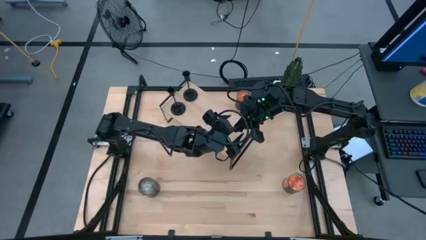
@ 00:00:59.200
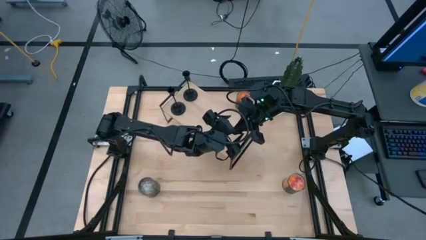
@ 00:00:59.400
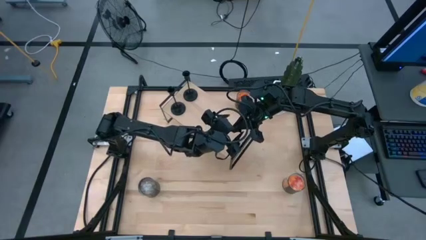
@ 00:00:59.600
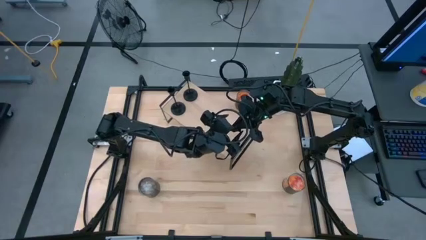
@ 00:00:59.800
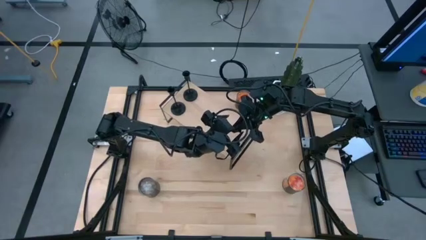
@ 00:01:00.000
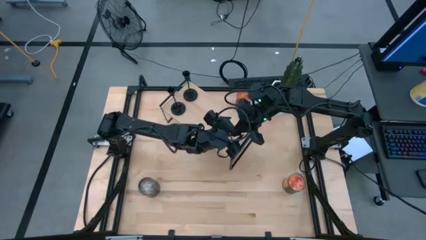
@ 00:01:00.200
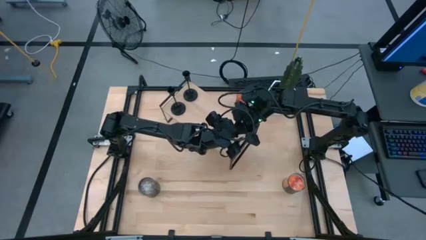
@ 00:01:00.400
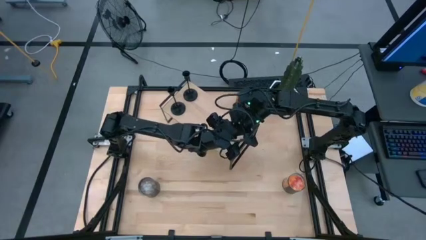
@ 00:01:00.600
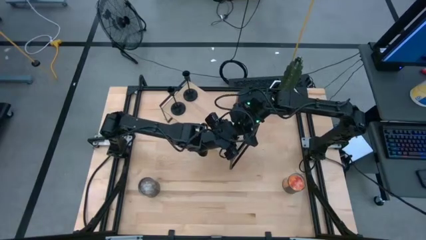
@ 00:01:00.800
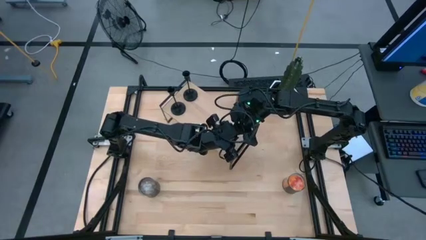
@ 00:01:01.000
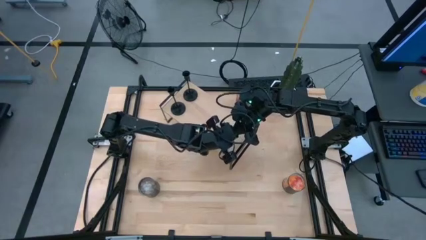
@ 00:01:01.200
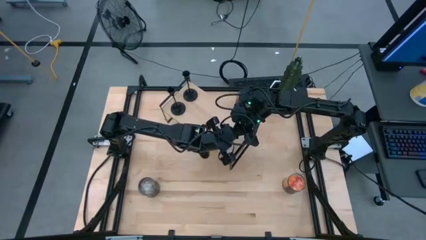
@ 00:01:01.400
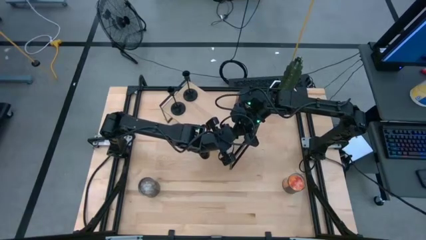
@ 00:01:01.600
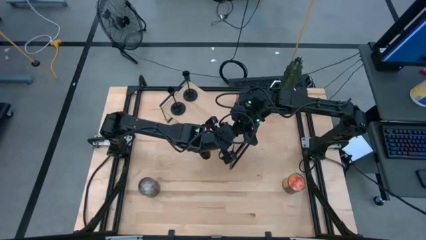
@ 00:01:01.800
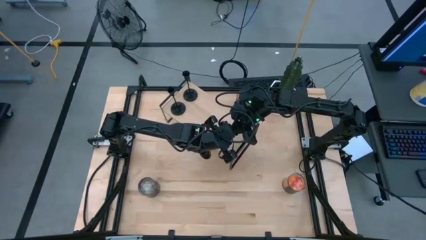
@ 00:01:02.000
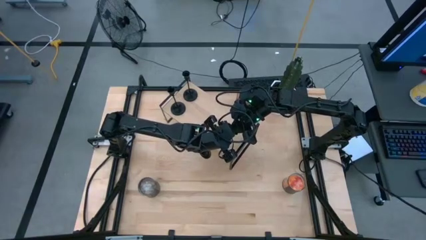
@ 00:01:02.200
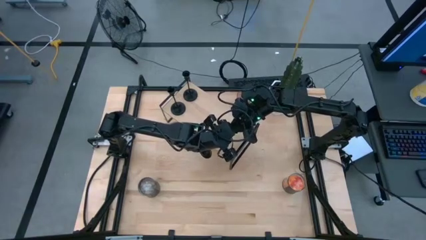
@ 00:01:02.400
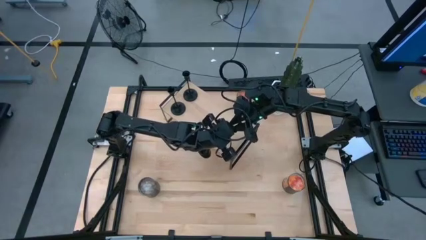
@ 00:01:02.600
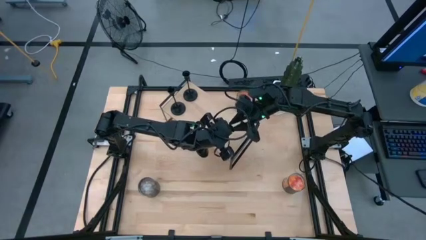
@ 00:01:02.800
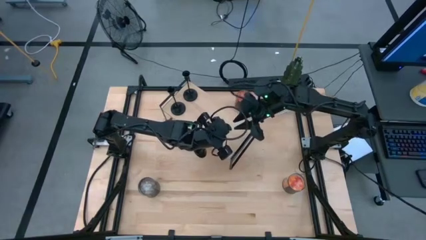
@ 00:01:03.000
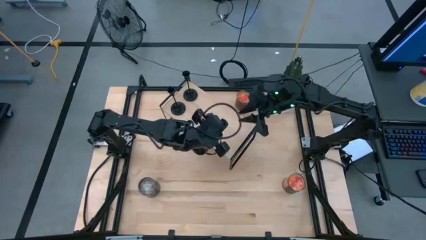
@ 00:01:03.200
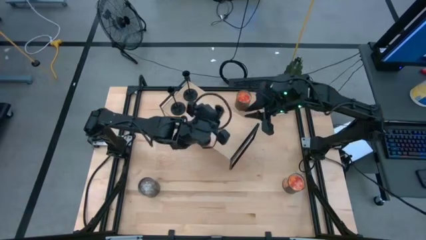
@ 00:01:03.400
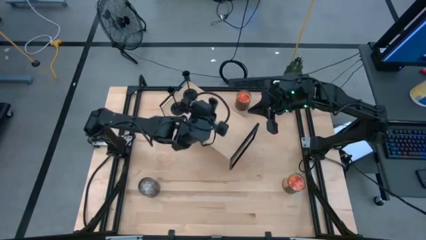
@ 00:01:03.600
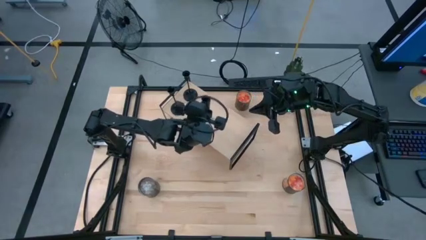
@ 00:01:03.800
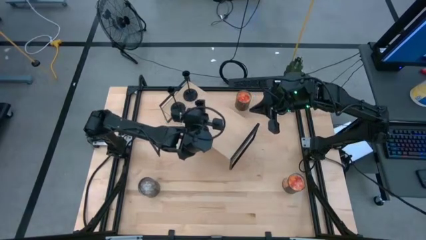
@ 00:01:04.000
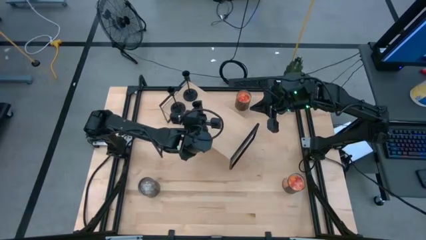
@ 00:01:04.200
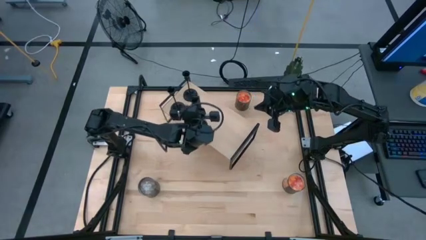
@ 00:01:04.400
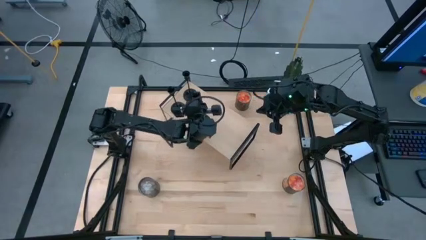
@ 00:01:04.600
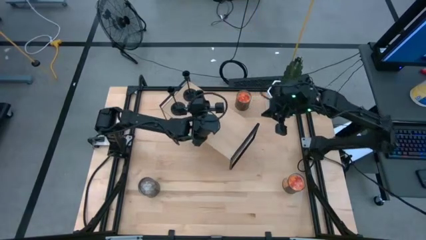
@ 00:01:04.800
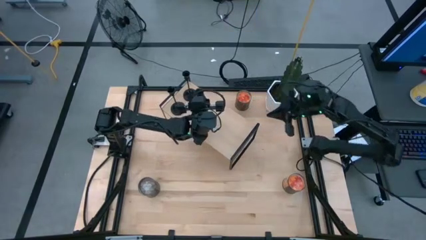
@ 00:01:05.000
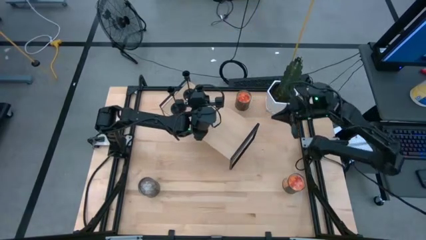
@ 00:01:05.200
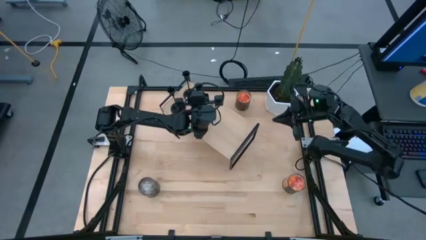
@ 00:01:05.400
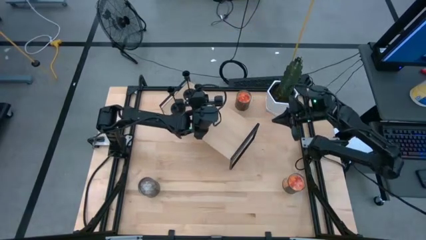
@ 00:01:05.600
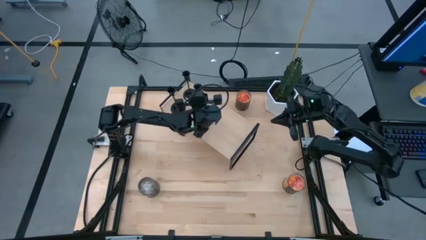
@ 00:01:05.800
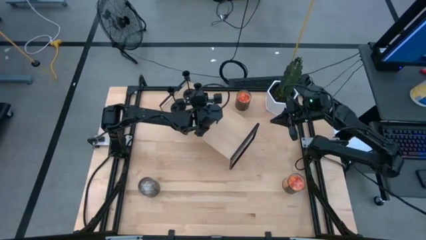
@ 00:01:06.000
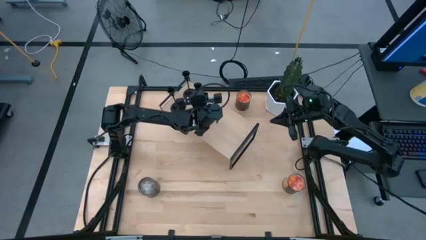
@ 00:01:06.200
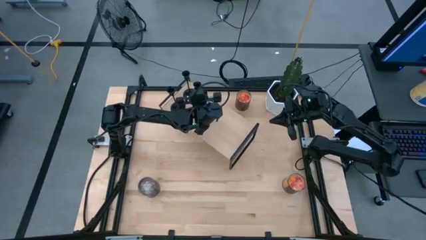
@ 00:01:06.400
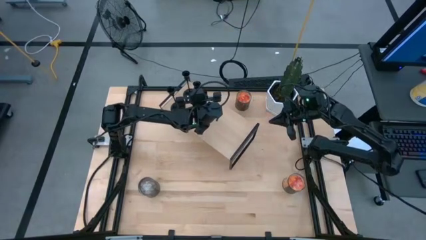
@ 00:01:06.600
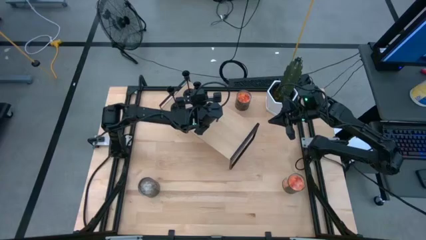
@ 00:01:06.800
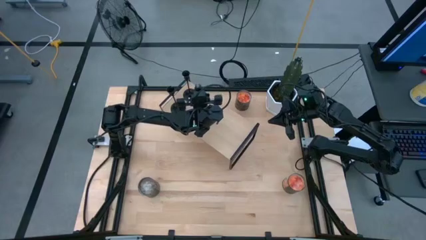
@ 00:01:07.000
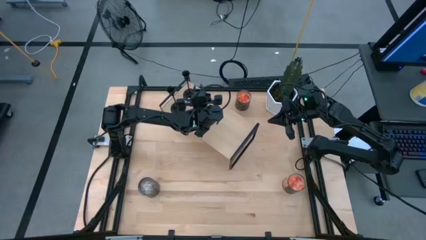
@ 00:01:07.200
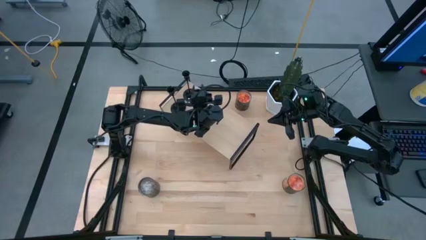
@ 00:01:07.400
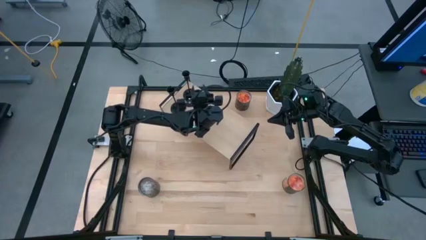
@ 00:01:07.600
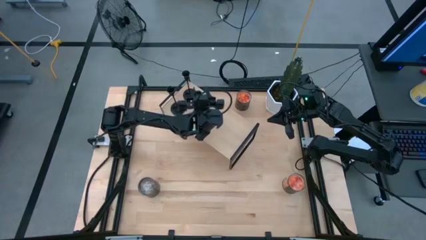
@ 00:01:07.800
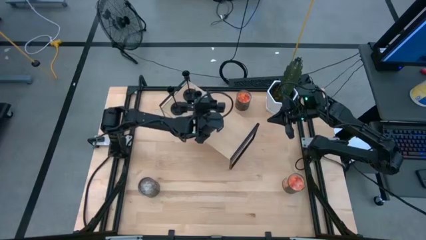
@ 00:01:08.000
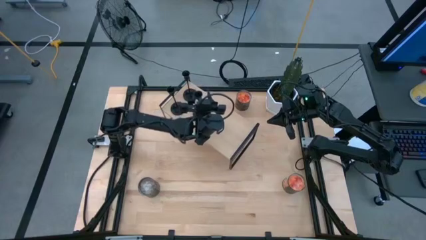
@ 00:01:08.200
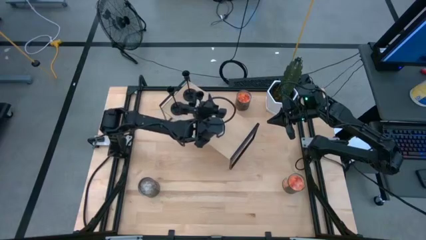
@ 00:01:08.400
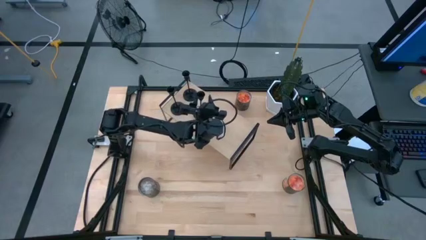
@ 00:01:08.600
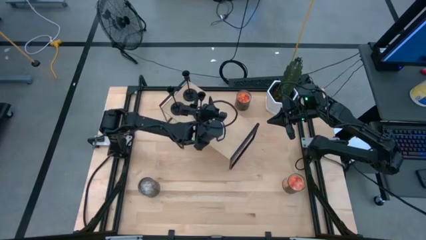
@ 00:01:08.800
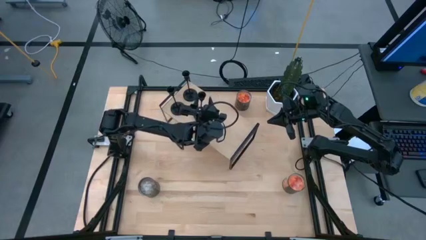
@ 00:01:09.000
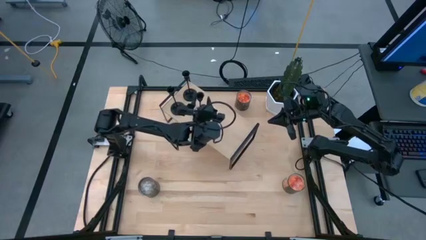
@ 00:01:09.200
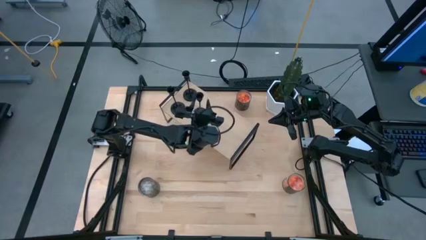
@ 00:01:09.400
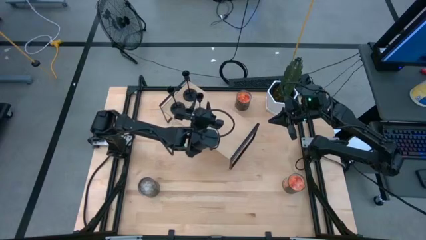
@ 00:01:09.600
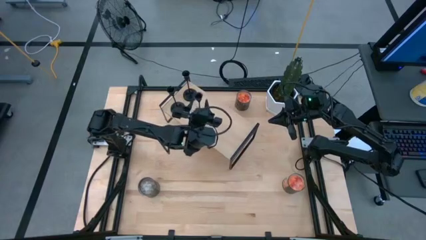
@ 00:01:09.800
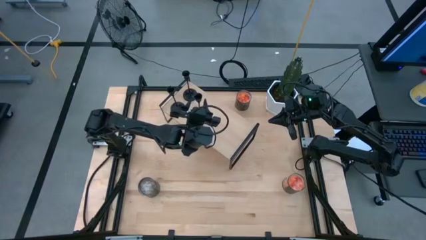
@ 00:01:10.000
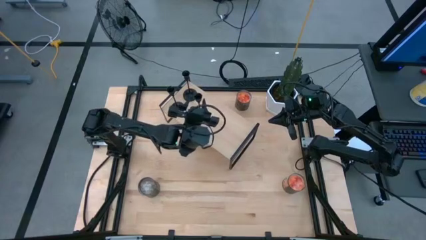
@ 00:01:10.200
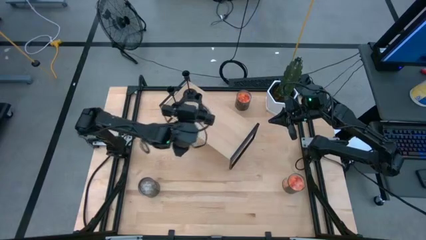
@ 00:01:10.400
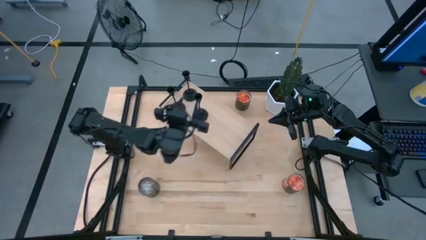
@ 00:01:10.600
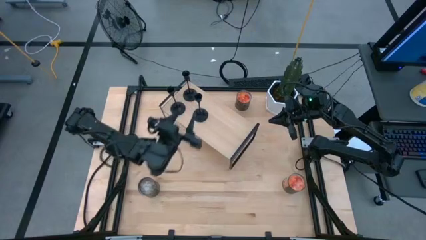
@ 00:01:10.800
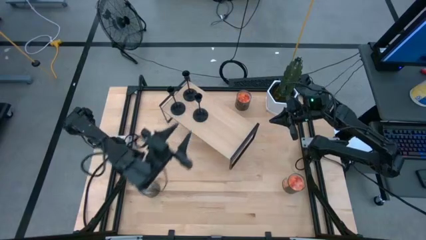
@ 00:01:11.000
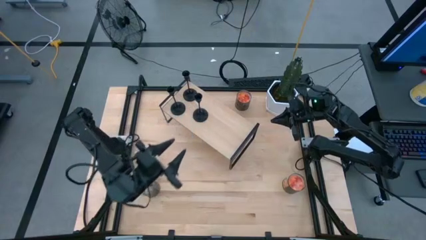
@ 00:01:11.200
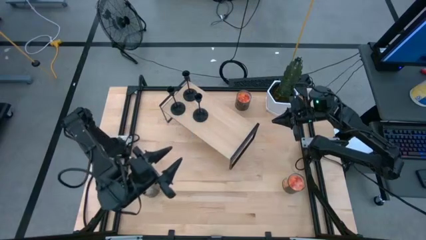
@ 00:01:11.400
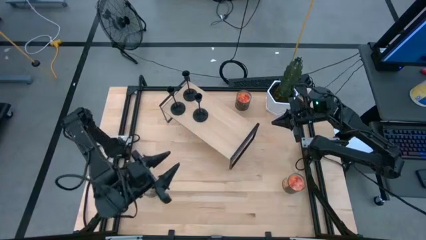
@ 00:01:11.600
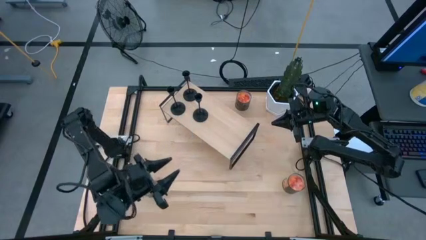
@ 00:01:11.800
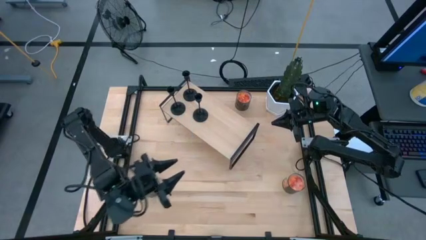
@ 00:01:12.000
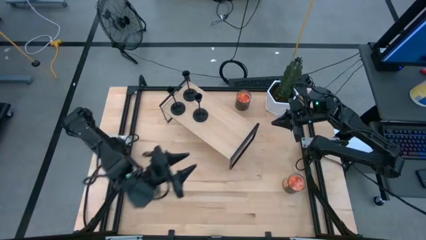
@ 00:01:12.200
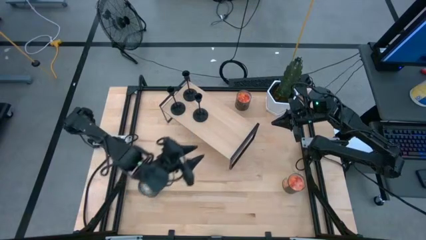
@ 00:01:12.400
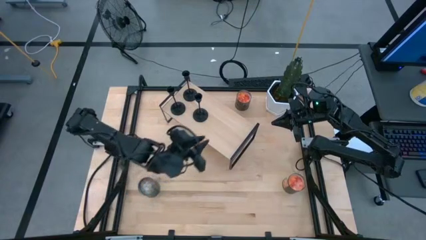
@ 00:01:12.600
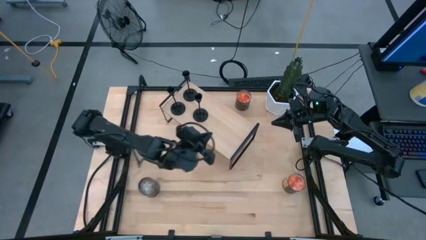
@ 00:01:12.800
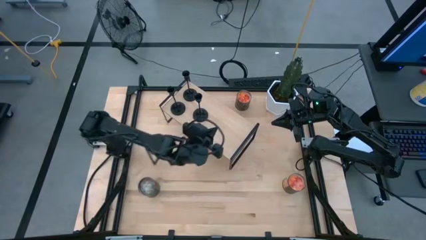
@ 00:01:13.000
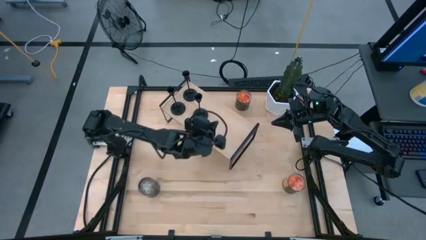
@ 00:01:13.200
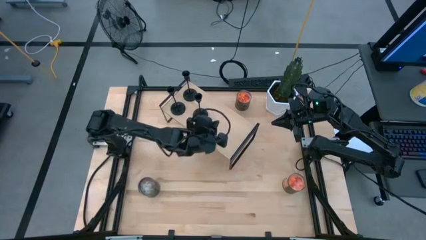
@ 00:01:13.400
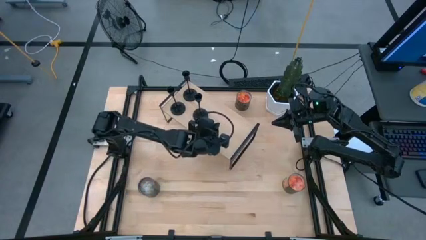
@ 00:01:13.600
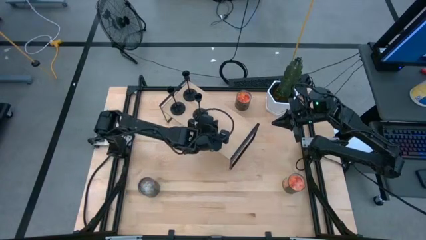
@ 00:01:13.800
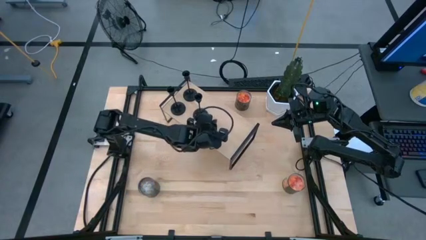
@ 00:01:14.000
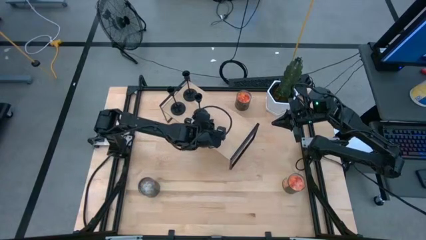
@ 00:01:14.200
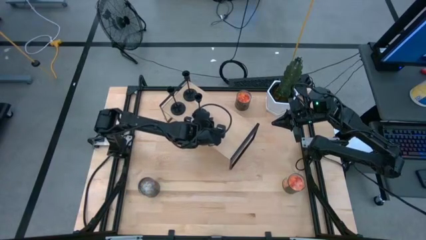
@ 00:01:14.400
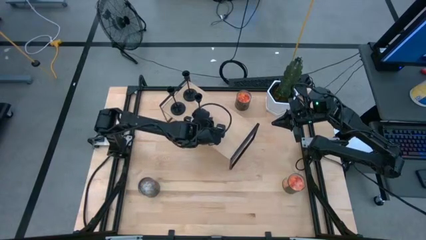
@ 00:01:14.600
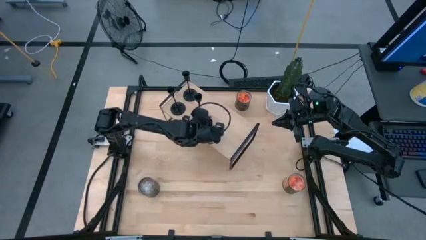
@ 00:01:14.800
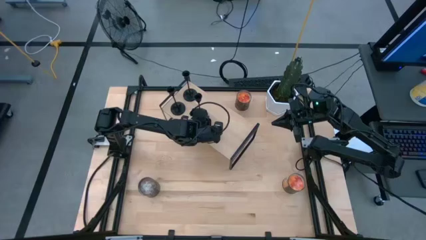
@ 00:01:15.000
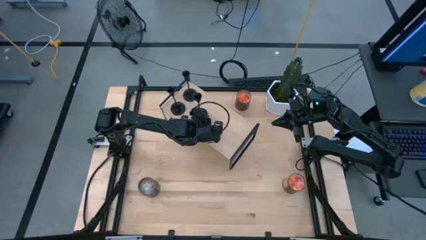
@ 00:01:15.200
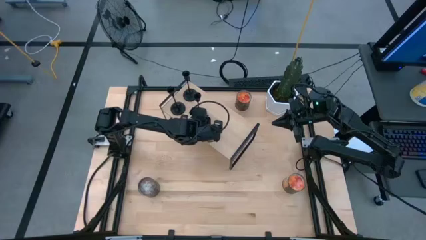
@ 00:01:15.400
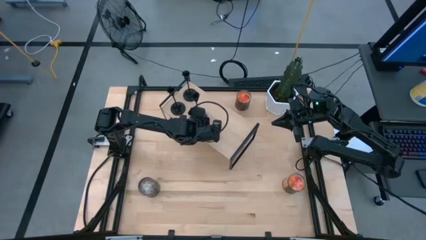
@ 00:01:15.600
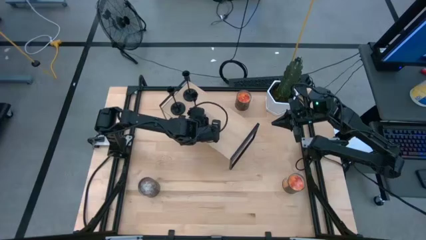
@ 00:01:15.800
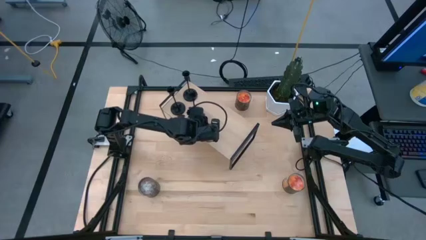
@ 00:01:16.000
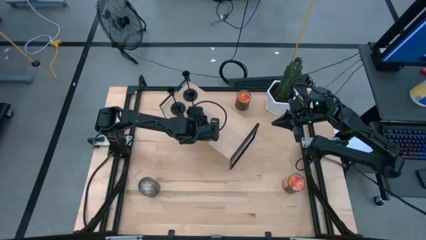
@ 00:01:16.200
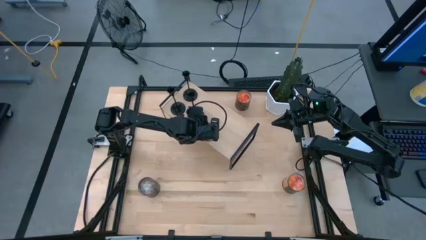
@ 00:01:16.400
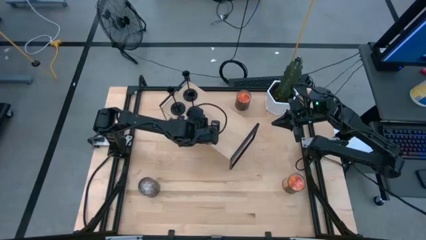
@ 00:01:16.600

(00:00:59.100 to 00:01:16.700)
Task: Pick & Place candle stick holders
Put the black candle holder on the shelf
